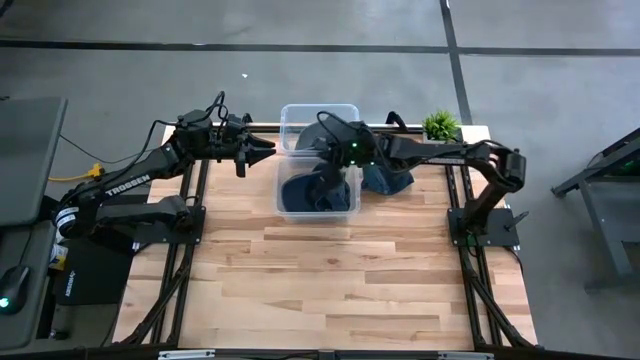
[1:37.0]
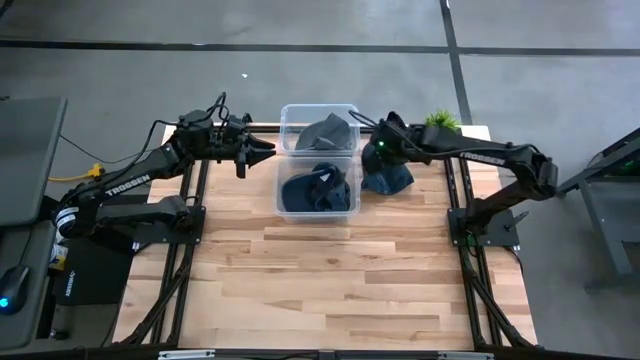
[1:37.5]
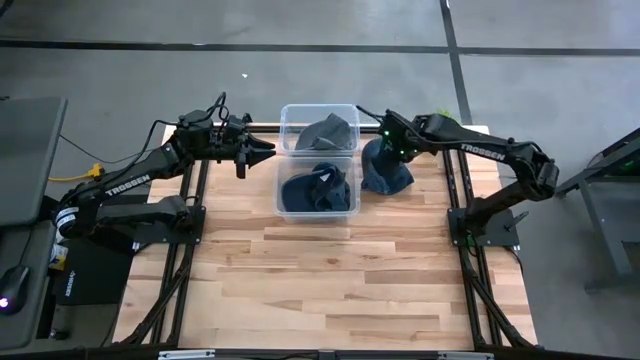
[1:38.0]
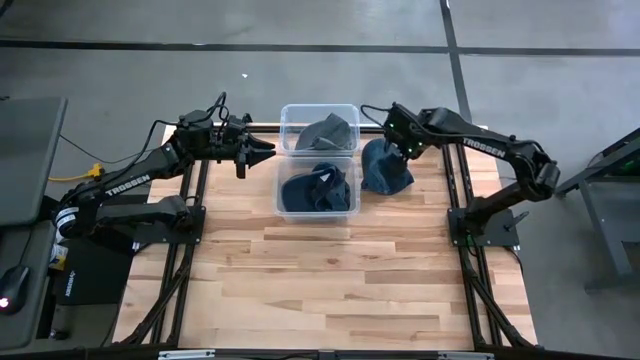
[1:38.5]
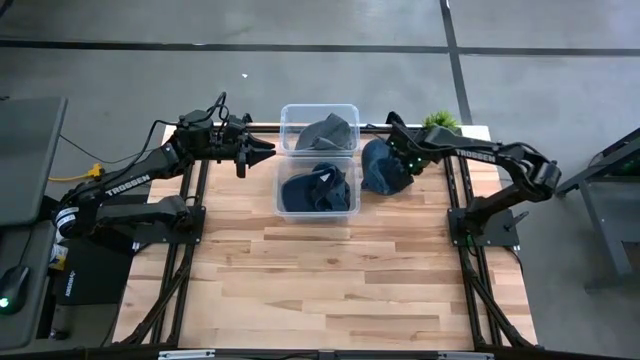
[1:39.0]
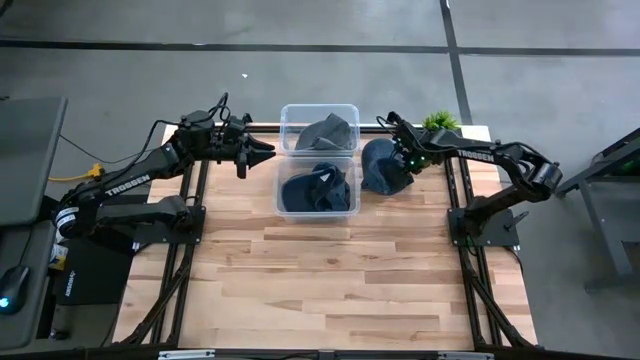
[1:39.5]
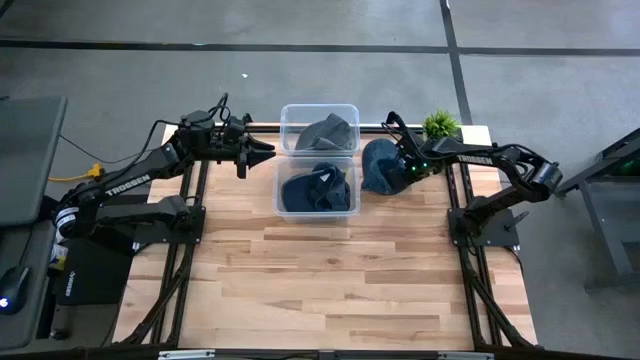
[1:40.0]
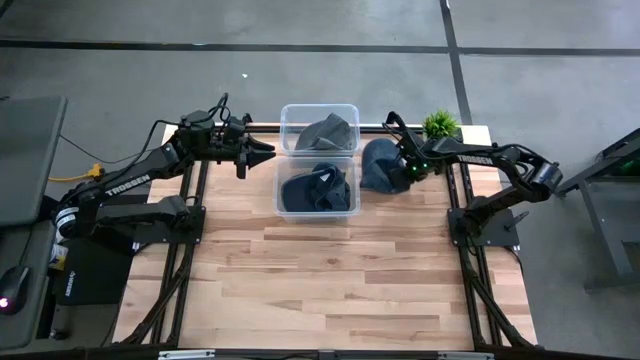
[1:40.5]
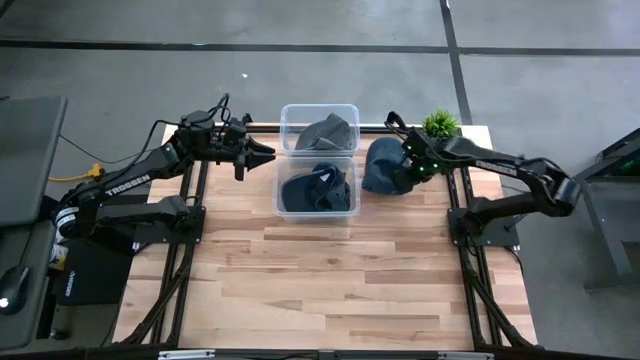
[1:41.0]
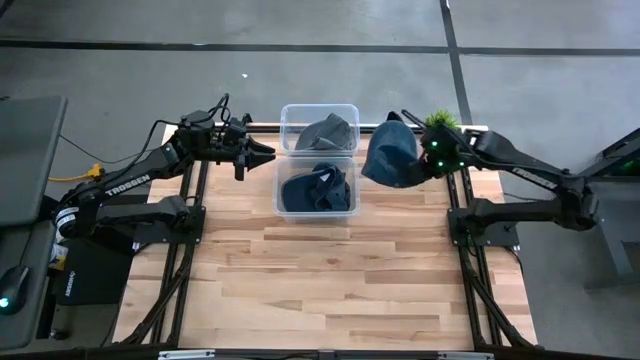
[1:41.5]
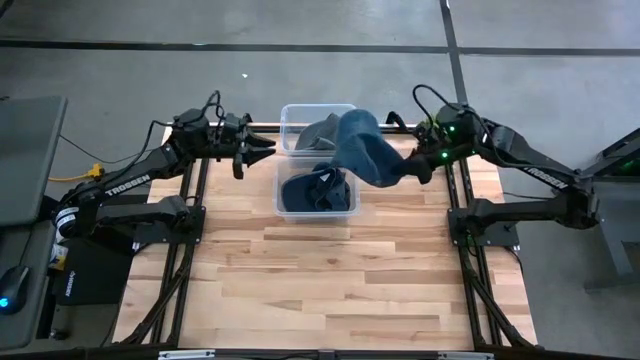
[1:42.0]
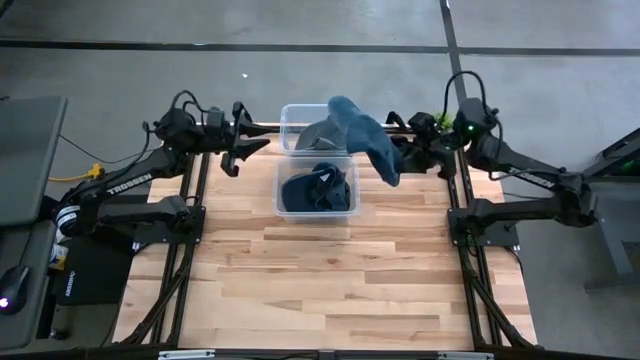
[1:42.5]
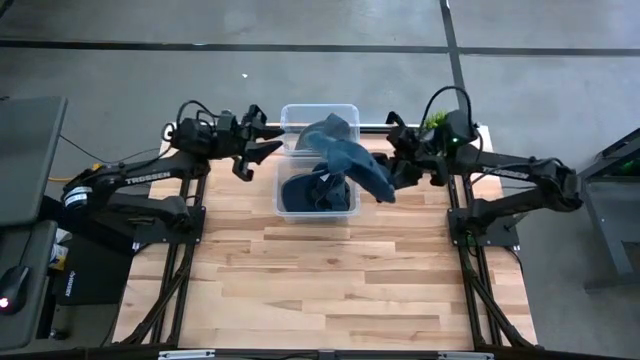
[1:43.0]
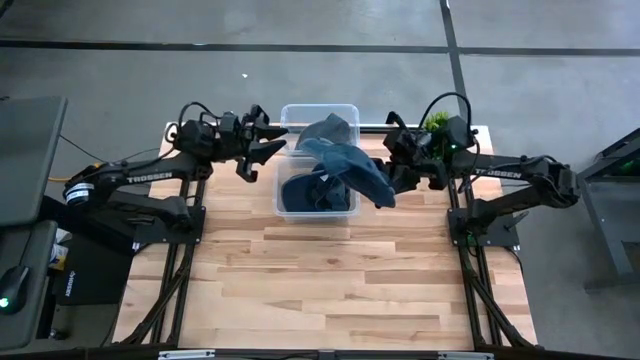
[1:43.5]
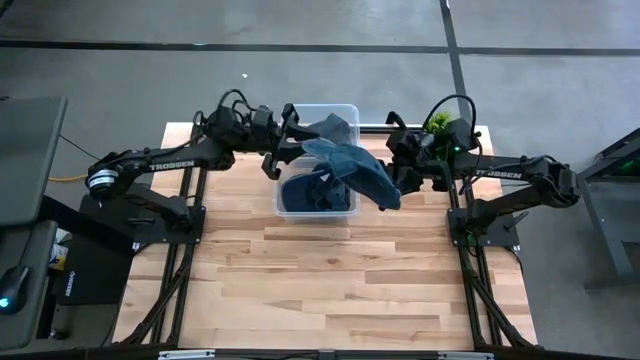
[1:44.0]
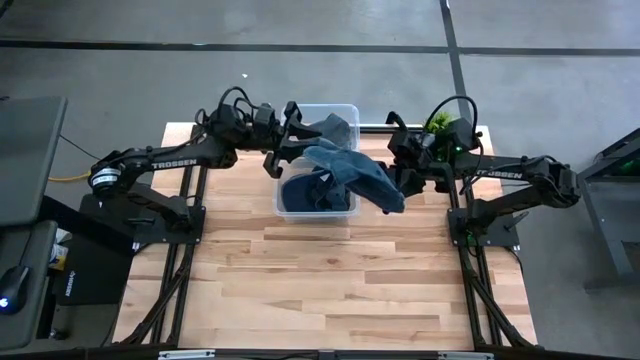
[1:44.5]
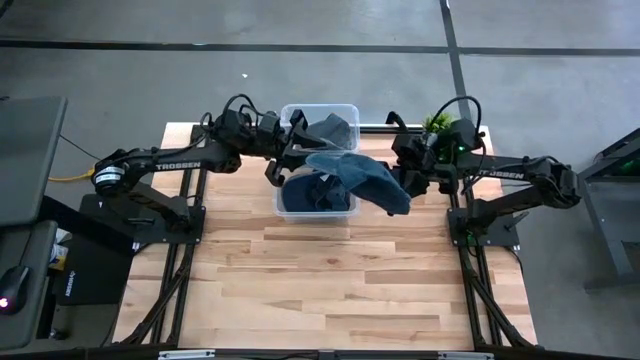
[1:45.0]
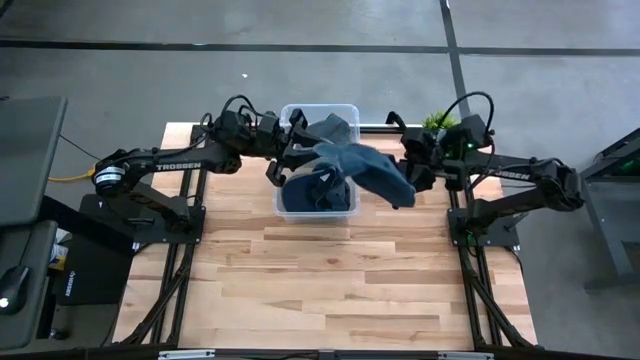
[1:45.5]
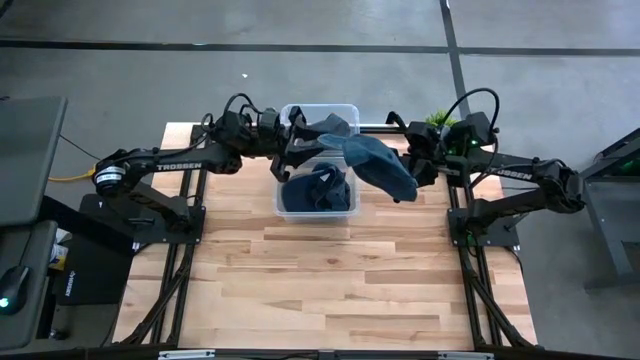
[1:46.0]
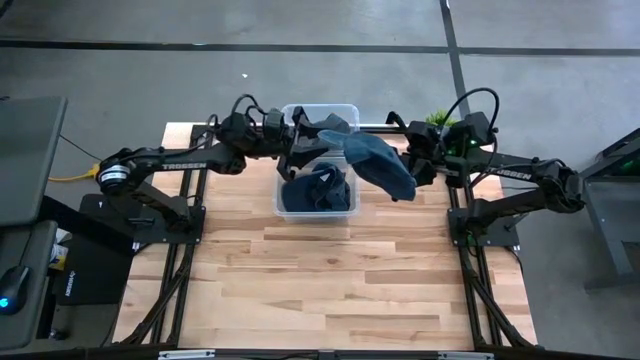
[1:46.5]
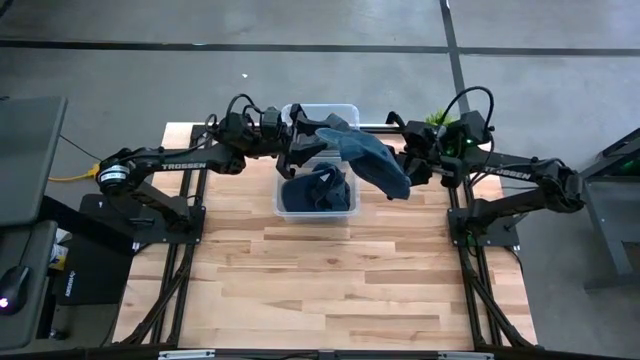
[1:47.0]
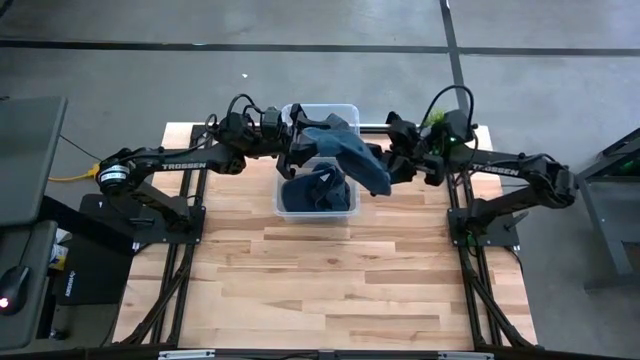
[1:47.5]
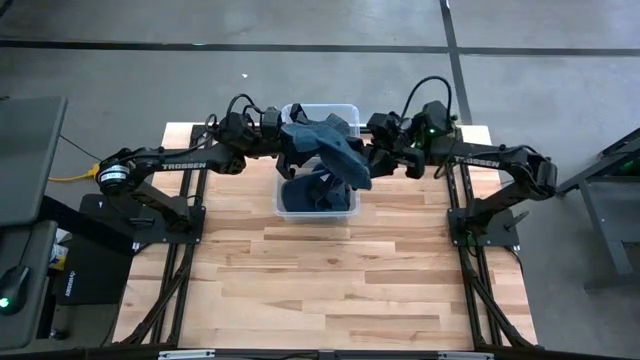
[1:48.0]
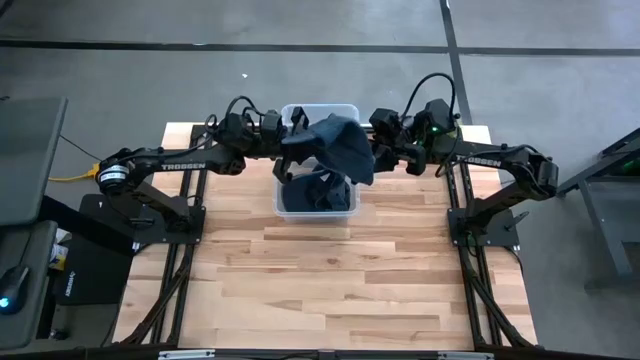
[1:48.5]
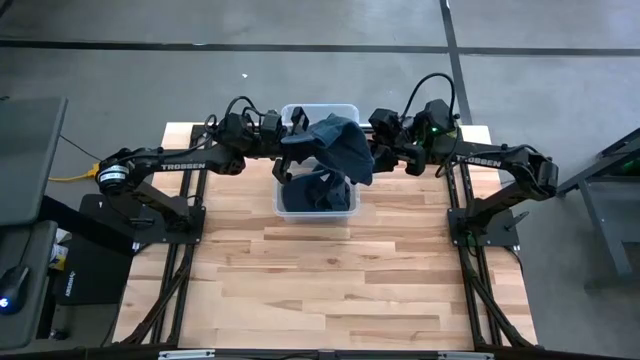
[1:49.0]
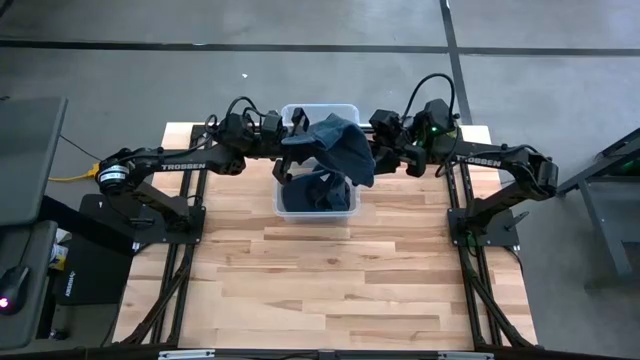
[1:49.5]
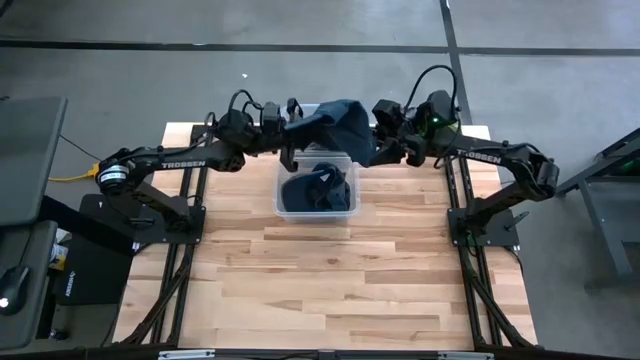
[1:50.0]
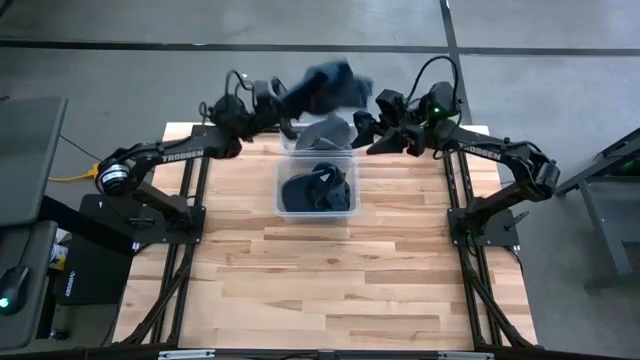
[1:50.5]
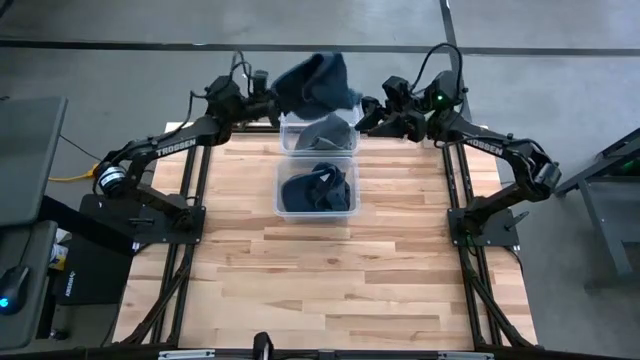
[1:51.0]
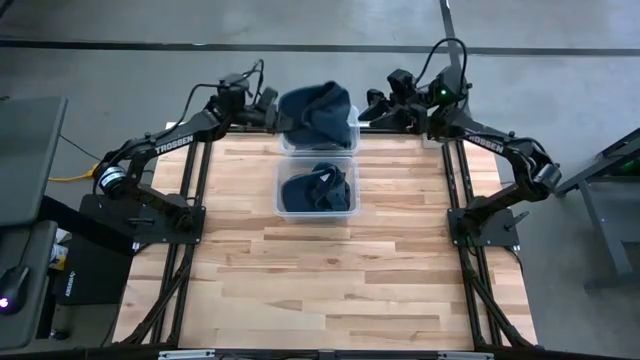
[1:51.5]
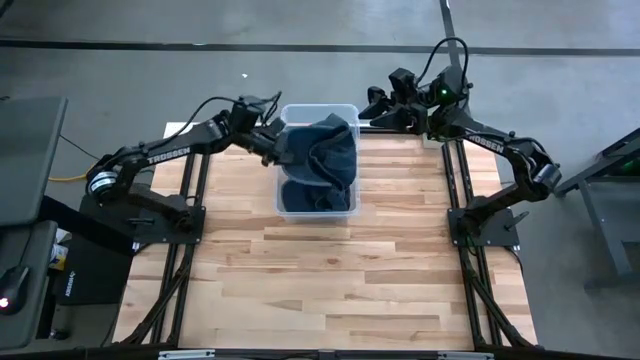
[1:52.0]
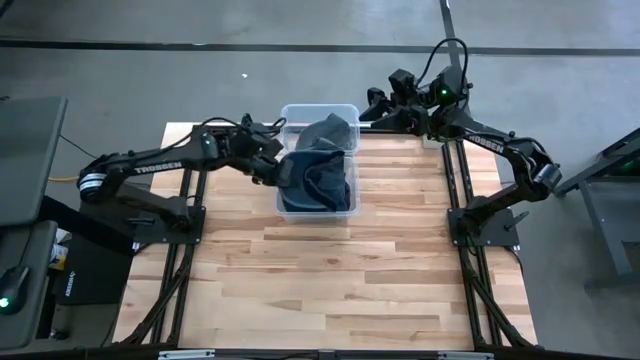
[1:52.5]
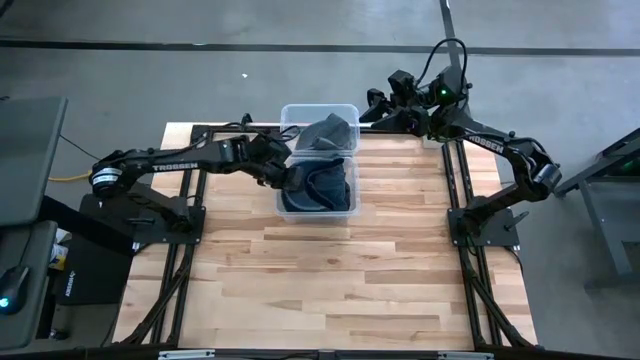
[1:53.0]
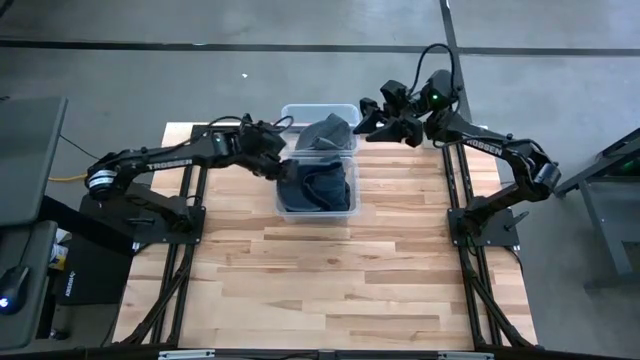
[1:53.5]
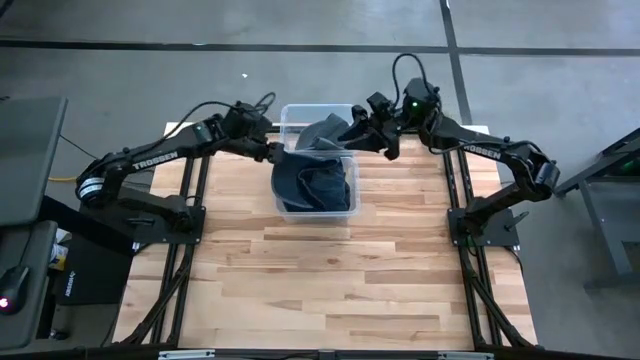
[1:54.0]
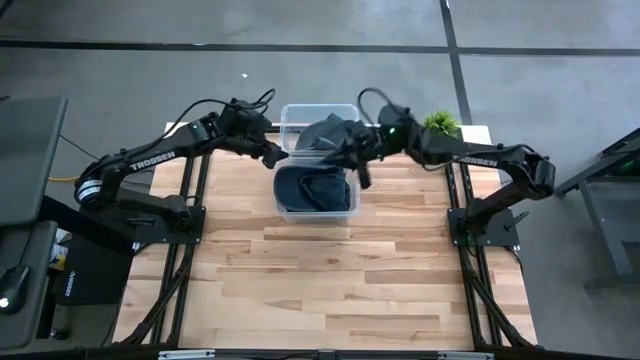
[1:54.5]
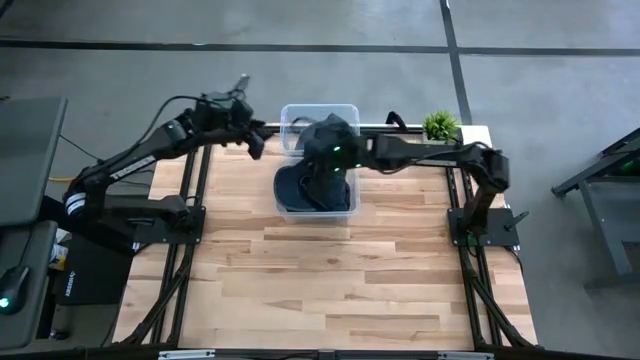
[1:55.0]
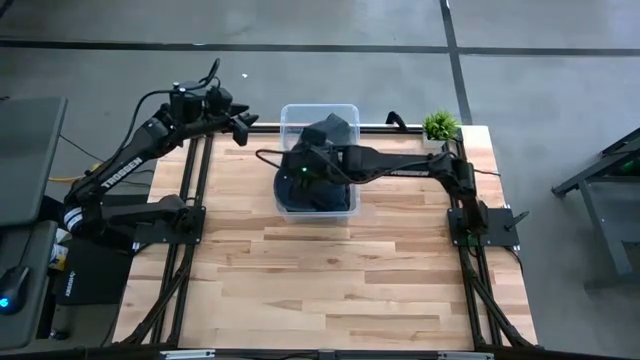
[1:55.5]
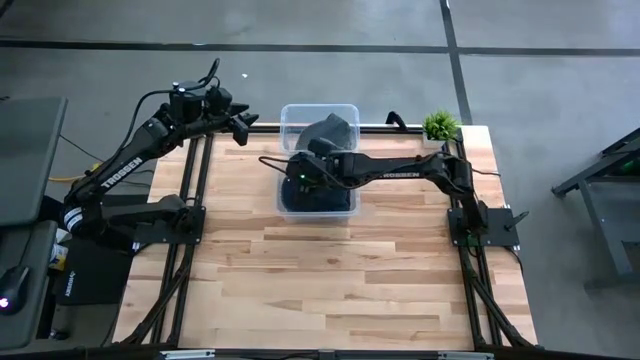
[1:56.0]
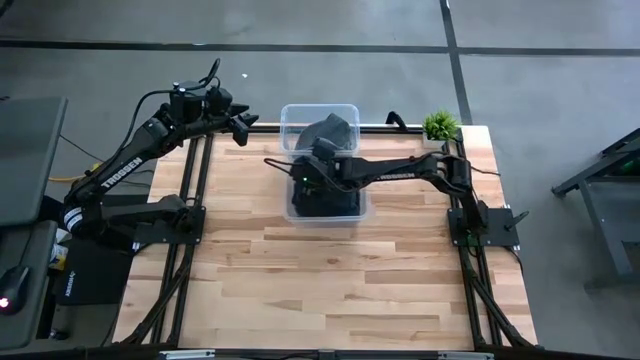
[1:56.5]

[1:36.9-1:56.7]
Task: Pick & Place hat
Put the dark blue cap into the bottom transparent bin

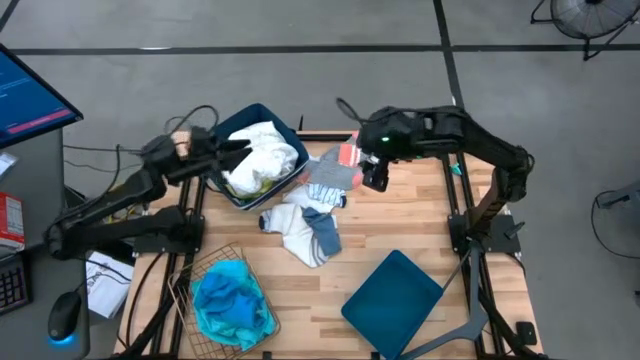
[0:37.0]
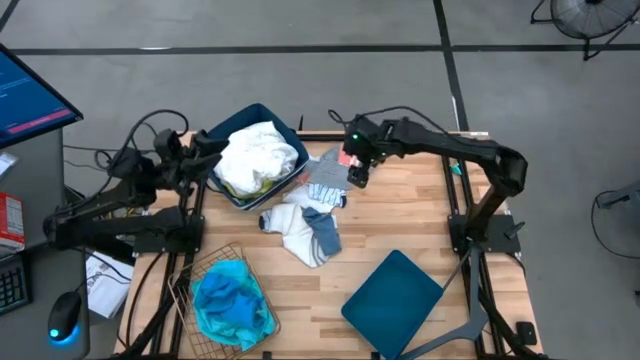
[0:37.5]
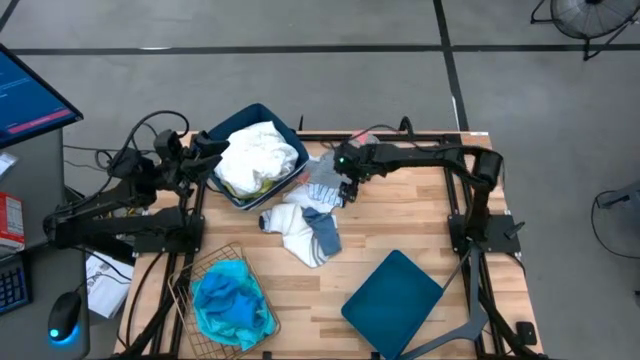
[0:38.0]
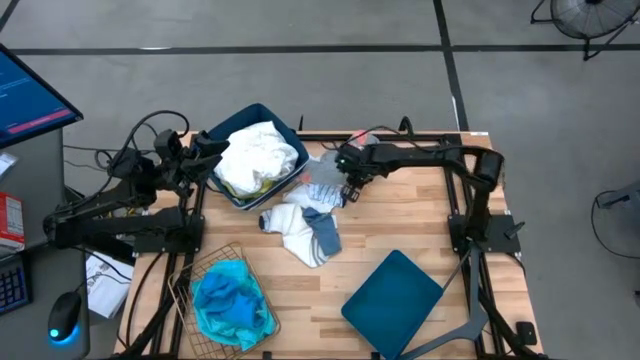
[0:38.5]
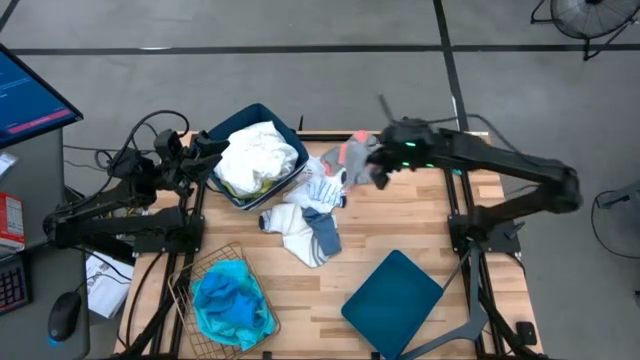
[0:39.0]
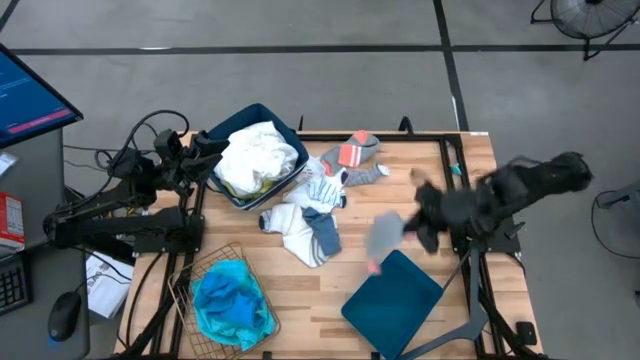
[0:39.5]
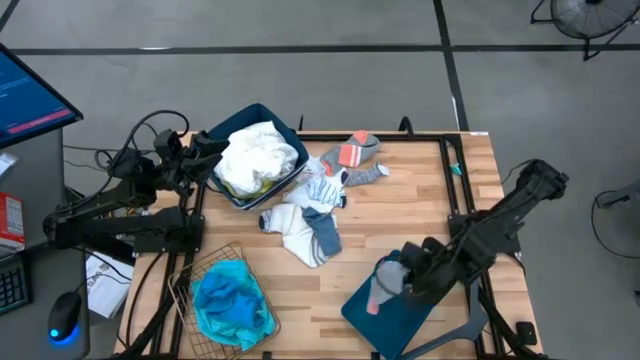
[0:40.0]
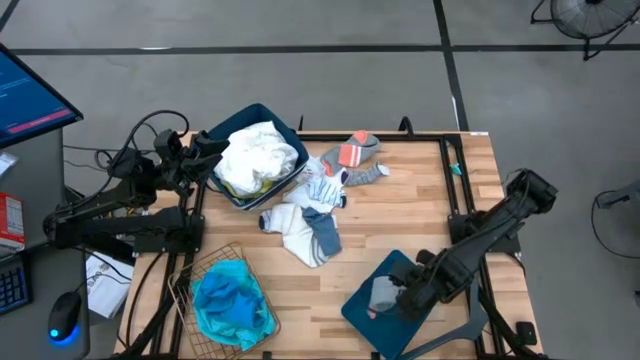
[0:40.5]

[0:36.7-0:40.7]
Task: Pick & Place Cloths
Put the bottom gray sock into the blue bin
